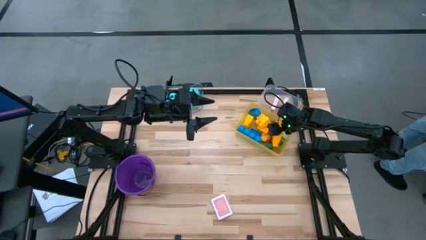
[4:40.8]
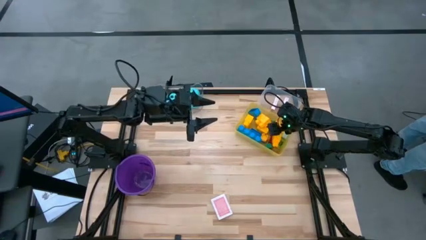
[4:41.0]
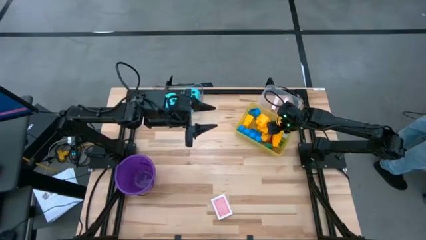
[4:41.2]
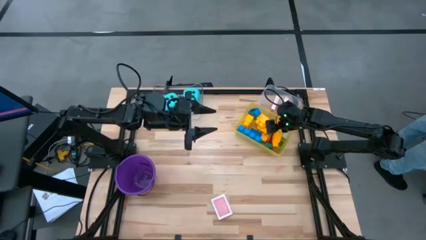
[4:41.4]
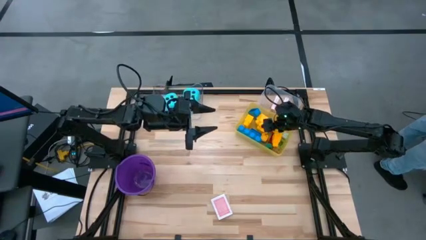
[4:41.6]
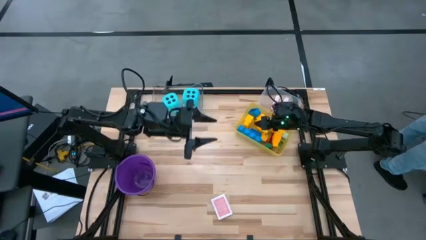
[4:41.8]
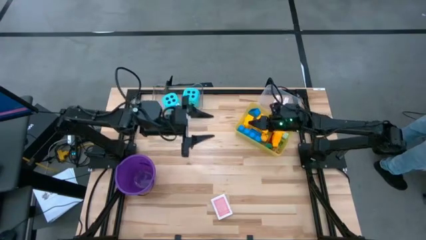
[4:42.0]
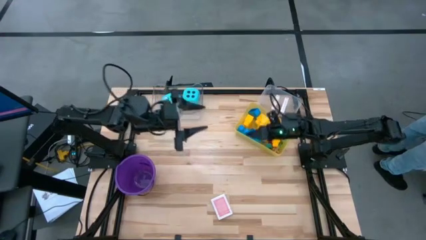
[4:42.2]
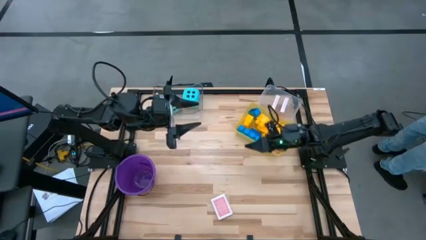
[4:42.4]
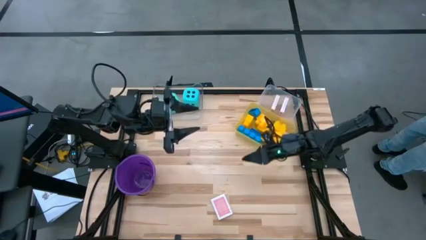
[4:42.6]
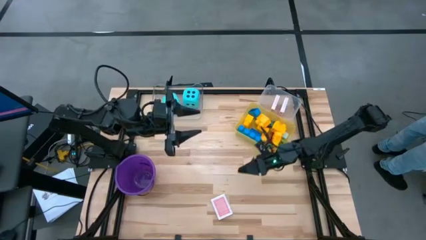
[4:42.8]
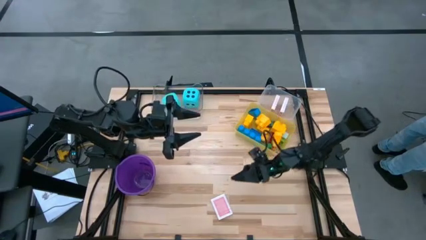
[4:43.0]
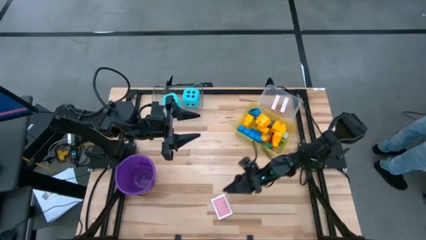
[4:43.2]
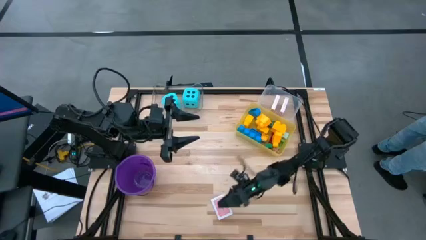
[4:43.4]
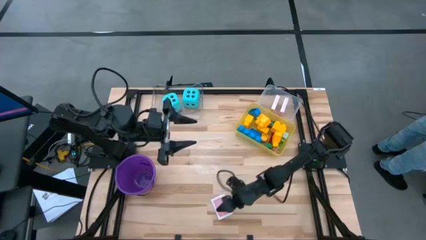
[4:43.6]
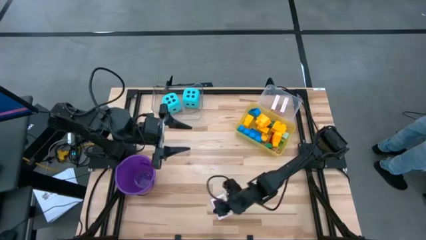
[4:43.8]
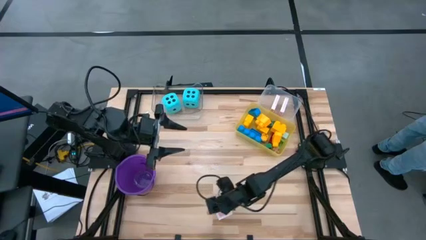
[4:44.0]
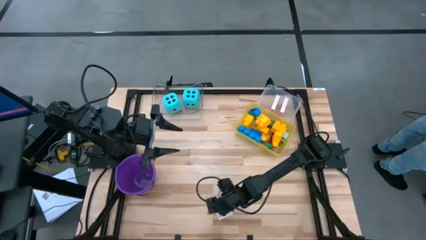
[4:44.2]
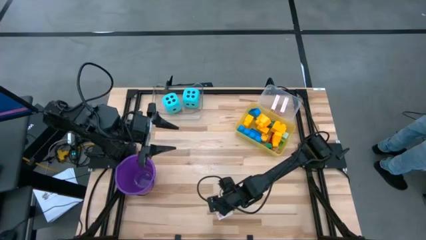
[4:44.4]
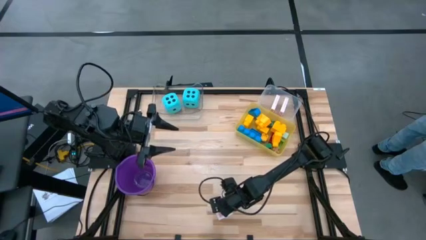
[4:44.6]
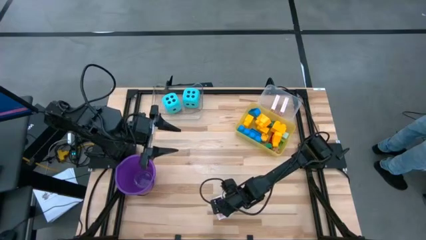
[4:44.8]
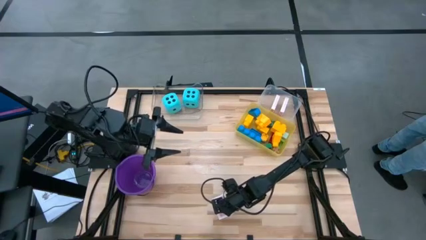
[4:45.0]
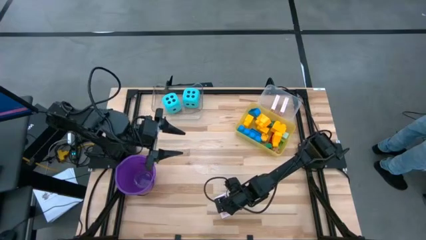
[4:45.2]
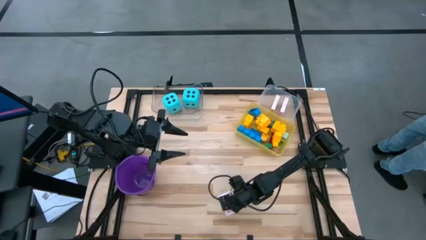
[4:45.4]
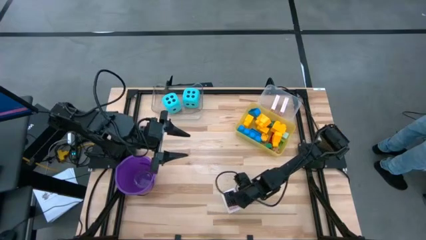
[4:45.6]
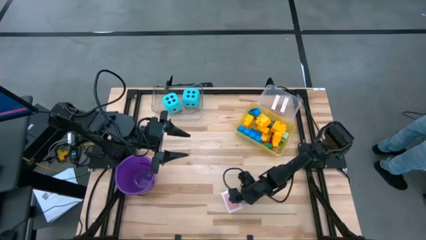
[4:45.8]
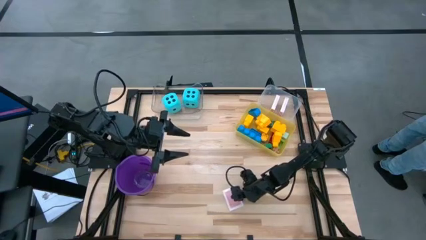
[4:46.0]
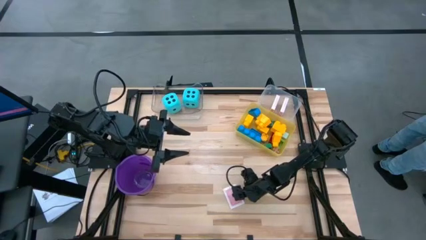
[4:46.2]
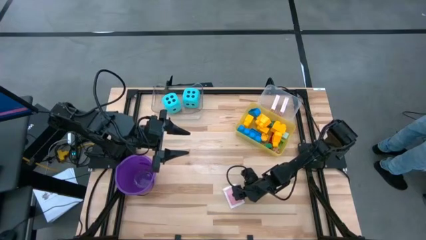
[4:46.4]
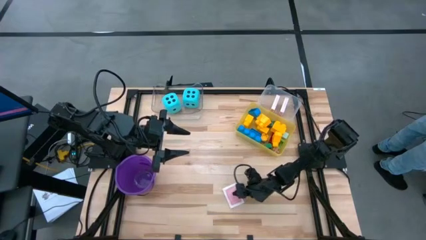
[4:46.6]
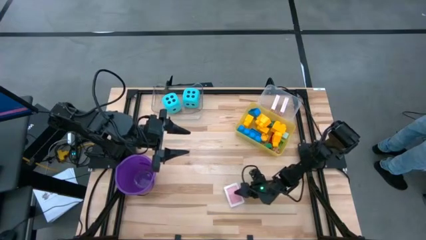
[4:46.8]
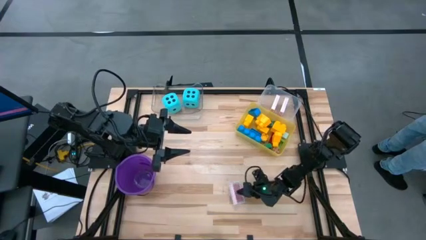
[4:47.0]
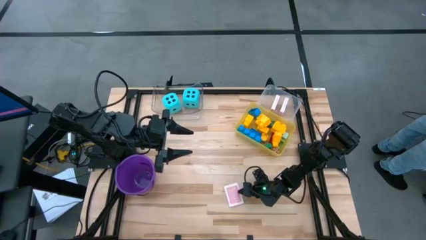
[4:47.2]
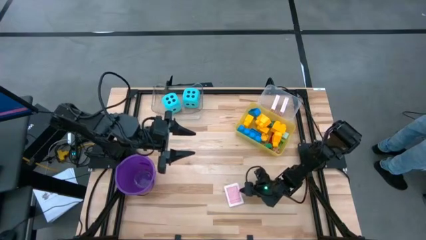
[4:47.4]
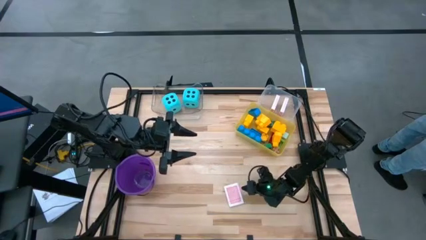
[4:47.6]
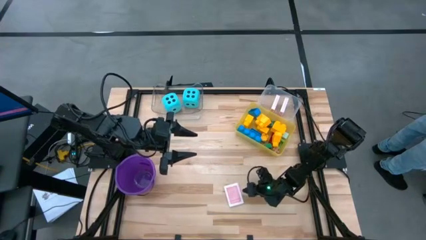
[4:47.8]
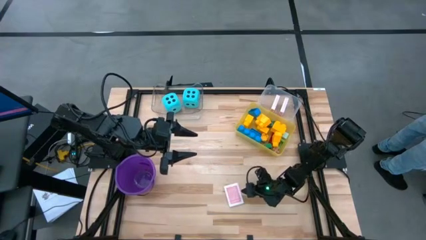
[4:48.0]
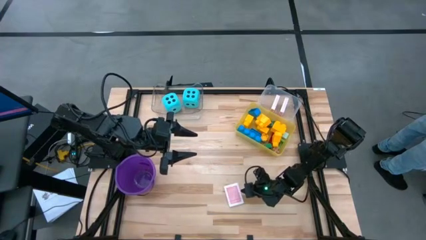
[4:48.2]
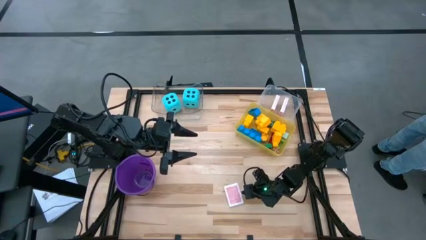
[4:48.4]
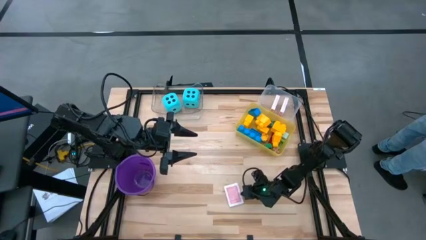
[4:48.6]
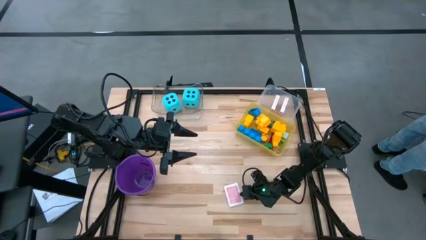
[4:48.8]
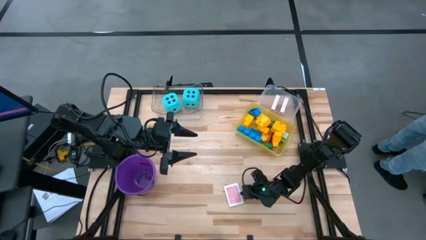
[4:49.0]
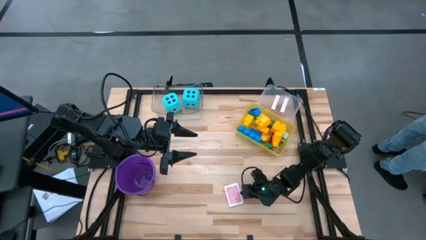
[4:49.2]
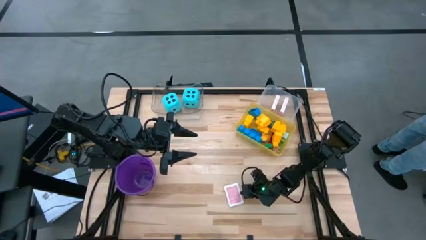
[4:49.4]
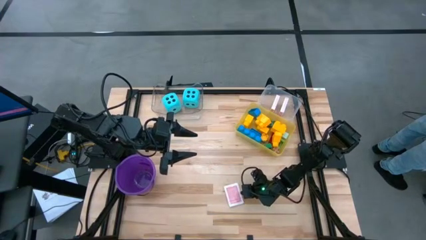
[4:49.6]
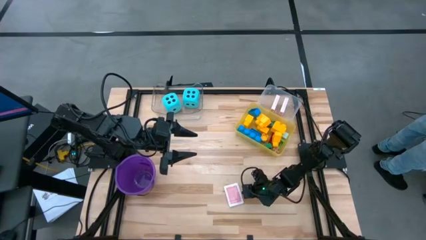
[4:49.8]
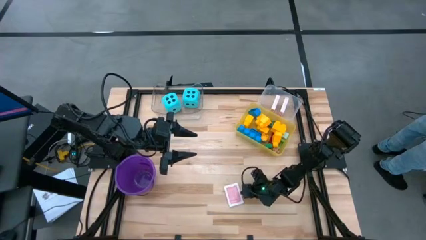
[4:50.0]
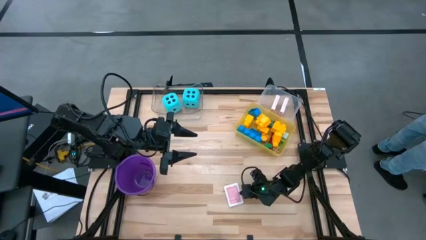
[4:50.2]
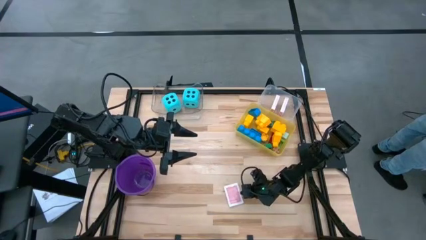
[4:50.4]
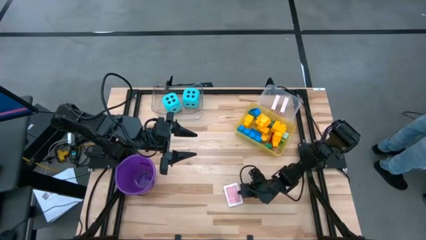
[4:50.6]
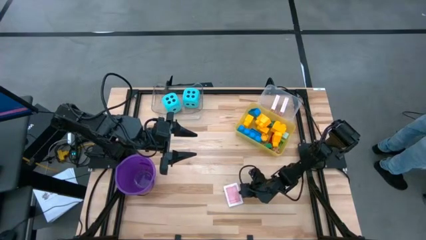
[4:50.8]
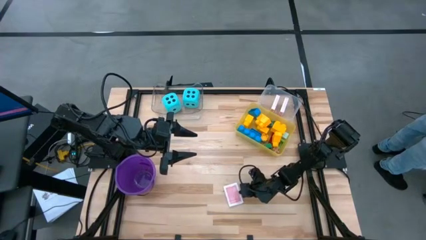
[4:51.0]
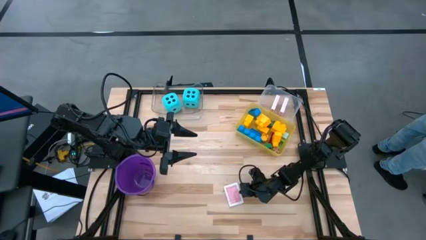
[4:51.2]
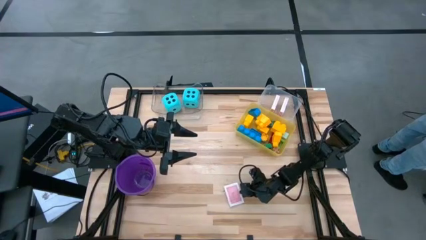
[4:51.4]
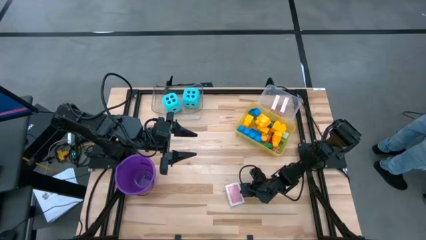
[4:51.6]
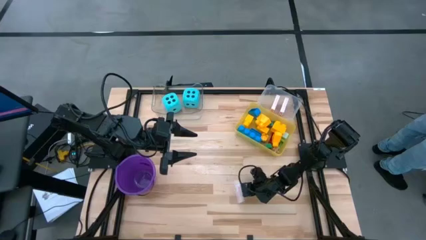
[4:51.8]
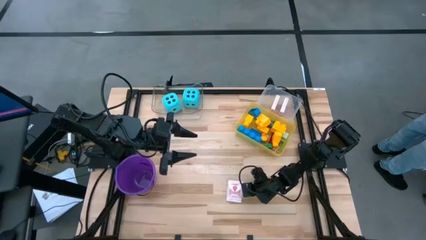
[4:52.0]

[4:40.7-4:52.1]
Task: Pick & Place Toys
Put the red deck of cards into the white bin
